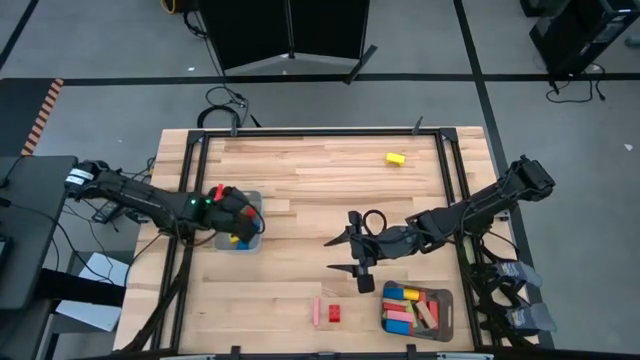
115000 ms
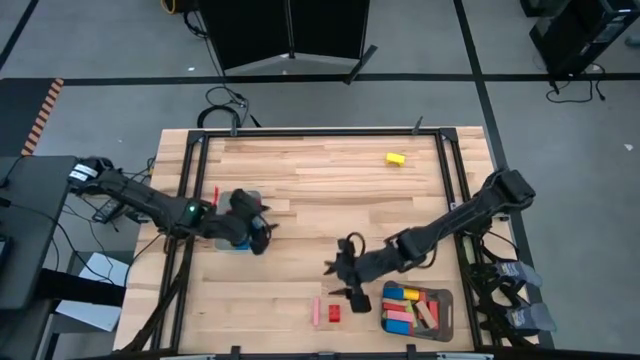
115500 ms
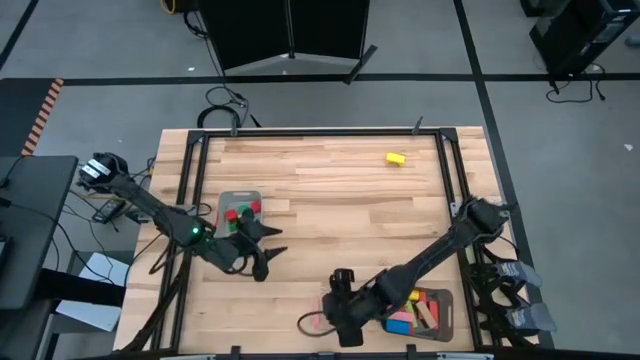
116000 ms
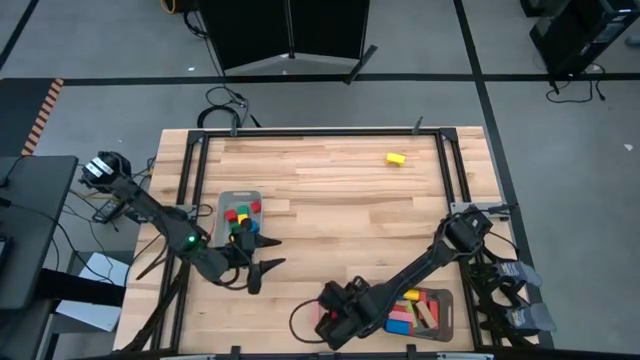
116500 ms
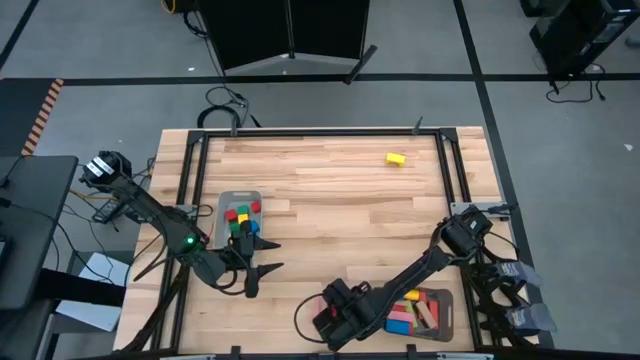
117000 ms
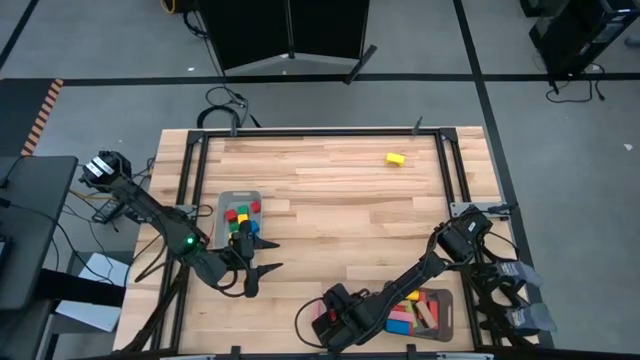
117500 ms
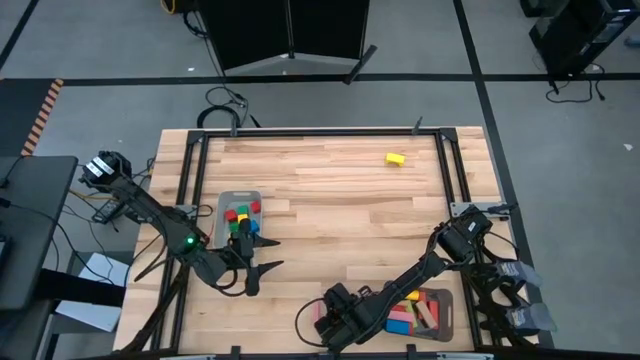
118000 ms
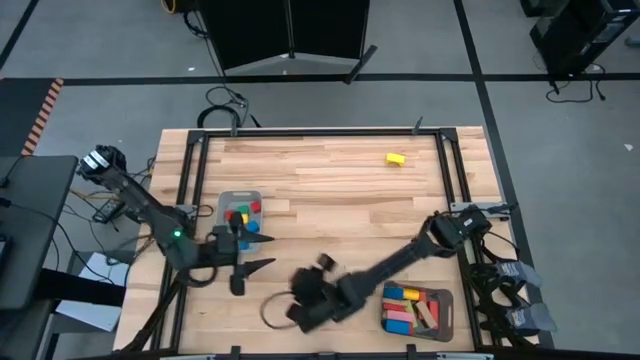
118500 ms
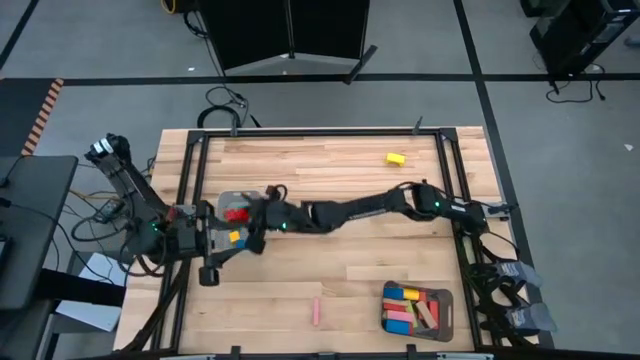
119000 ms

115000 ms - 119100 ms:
Task: Sort blocks by size
Put the red block into the grey bin

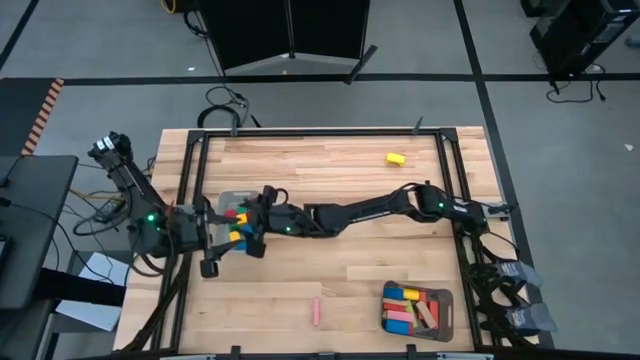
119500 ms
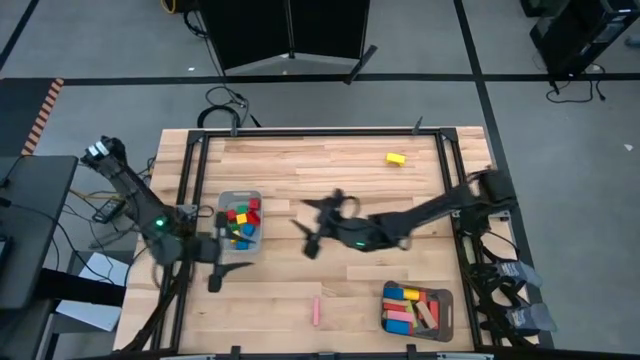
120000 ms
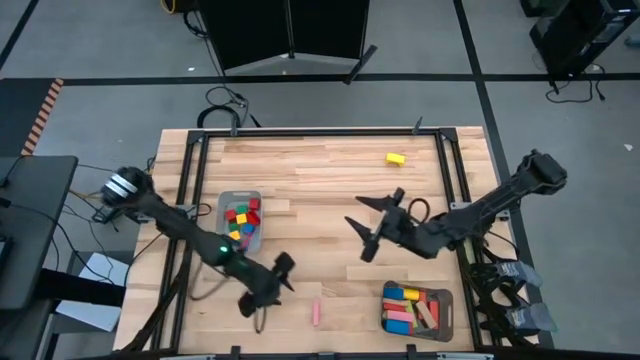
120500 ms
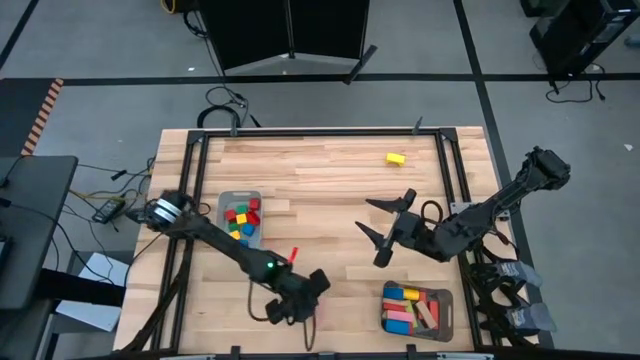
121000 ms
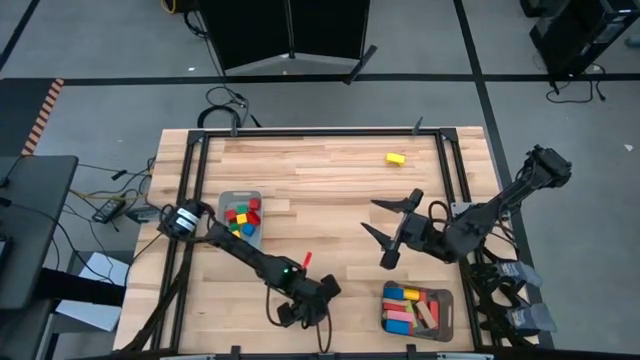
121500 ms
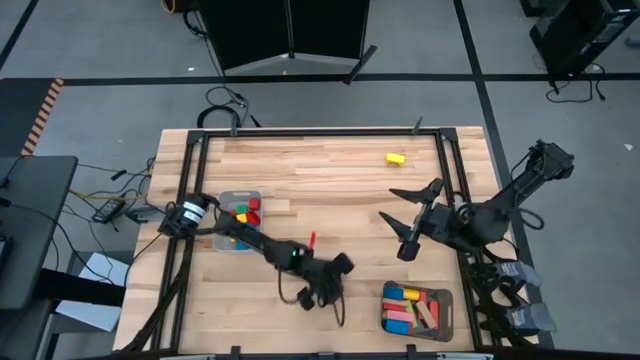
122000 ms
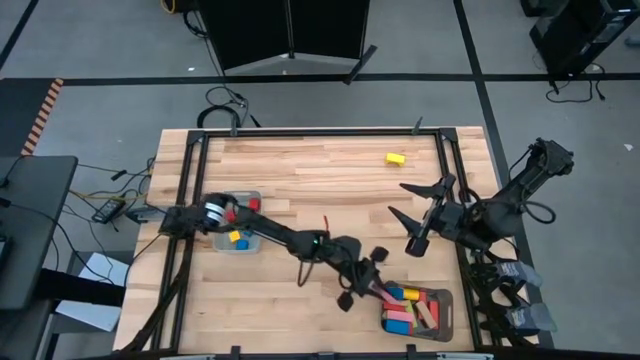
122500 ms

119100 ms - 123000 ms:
Put the pink block into the black bin

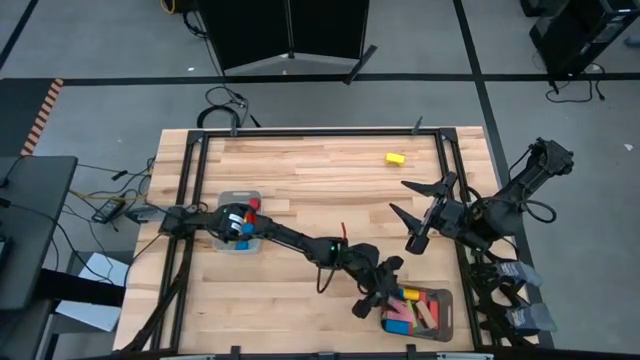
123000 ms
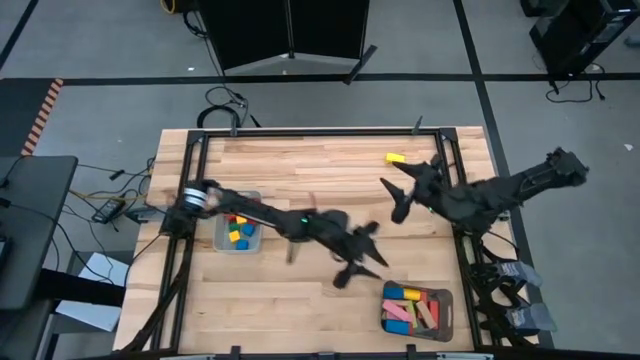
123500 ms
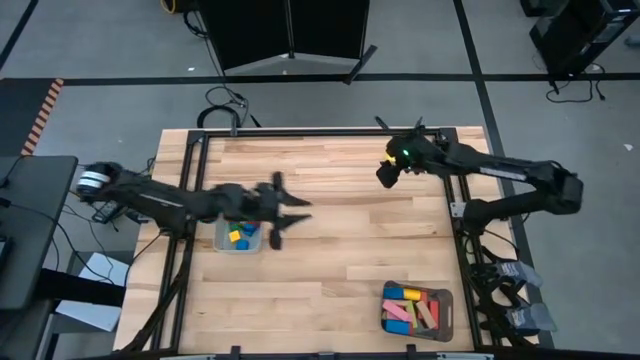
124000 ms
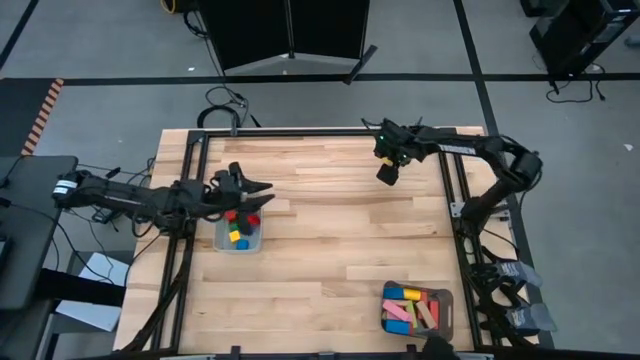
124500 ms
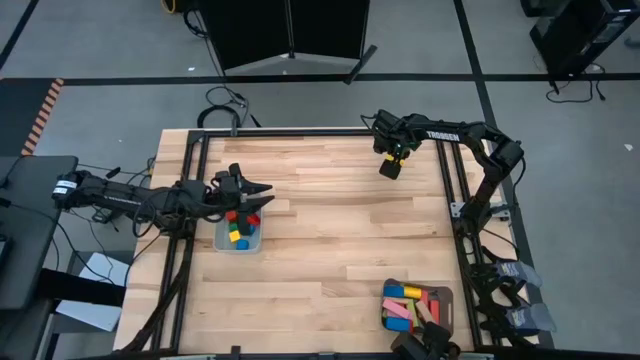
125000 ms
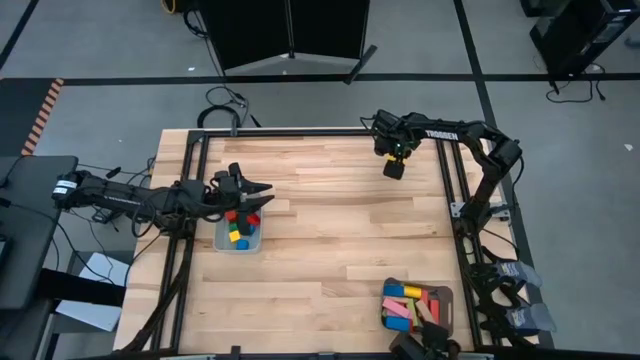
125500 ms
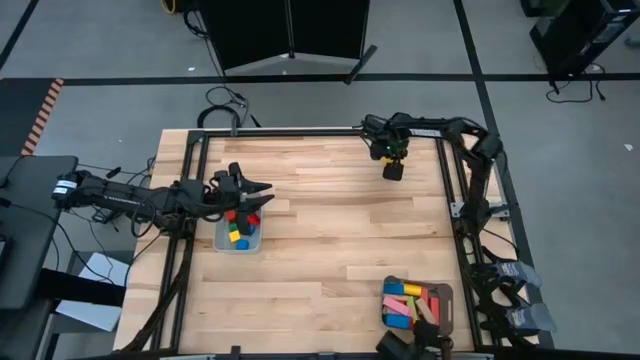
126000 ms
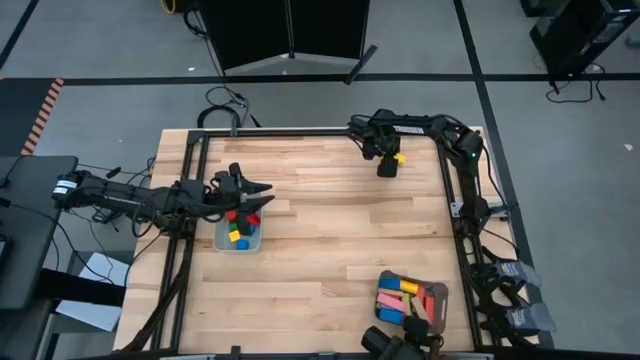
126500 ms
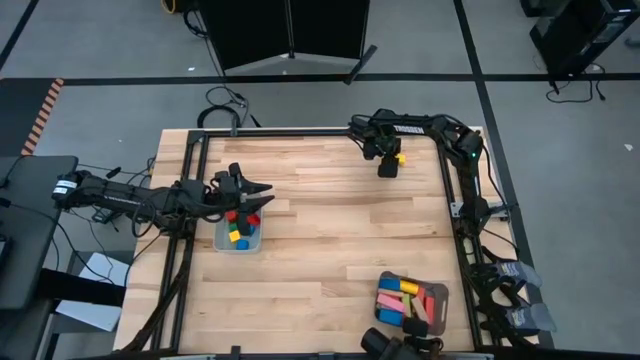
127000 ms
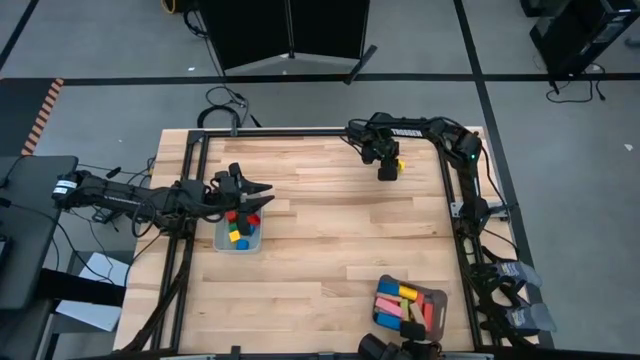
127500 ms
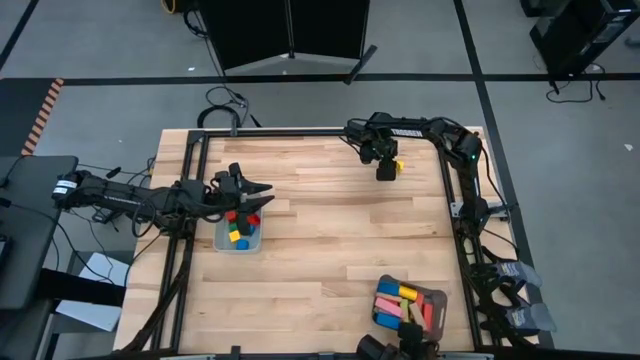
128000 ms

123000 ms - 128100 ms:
Put the yellow block into the black bin

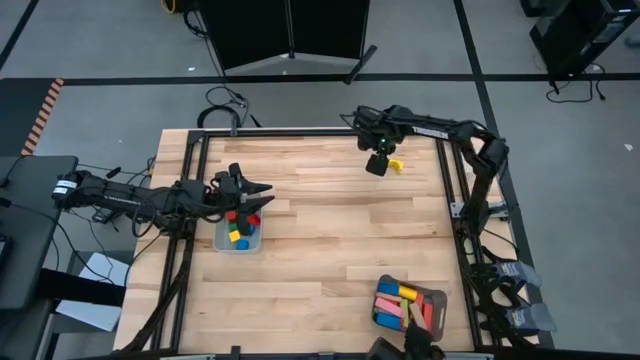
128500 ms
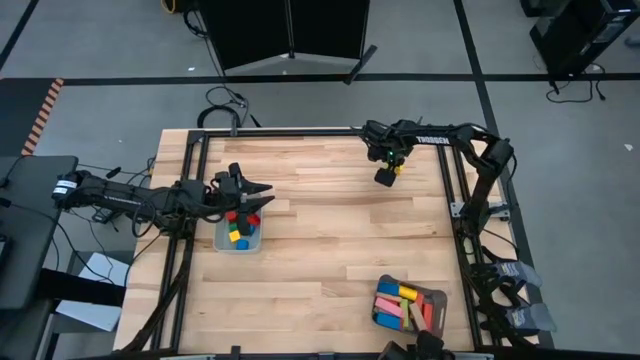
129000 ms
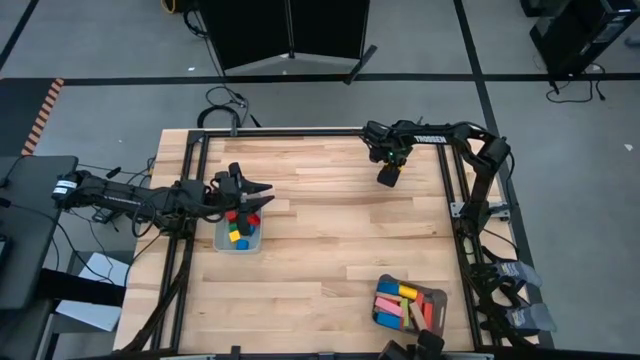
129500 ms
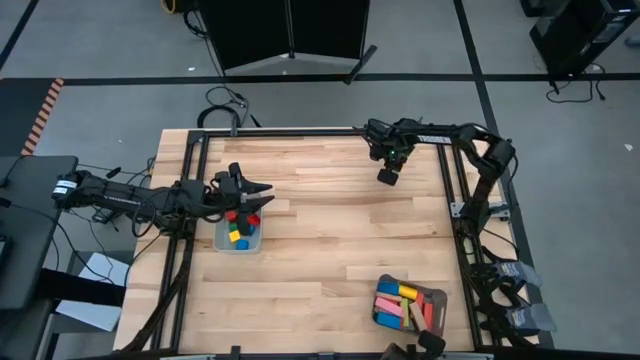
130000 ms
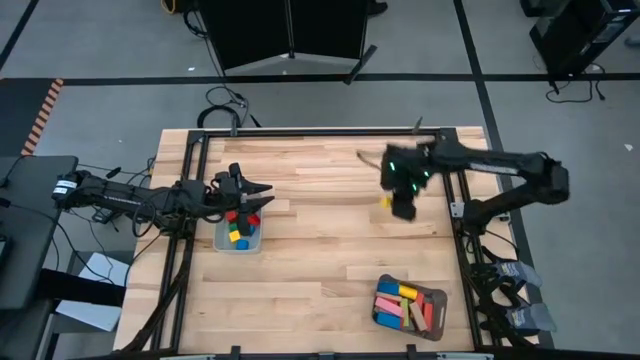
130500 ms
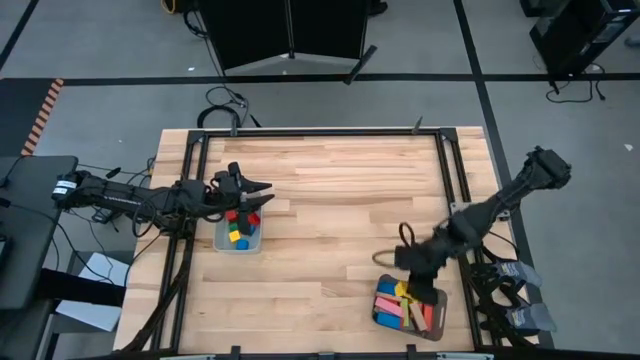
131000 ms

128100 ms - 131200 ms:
Put the yellow block into the black bin

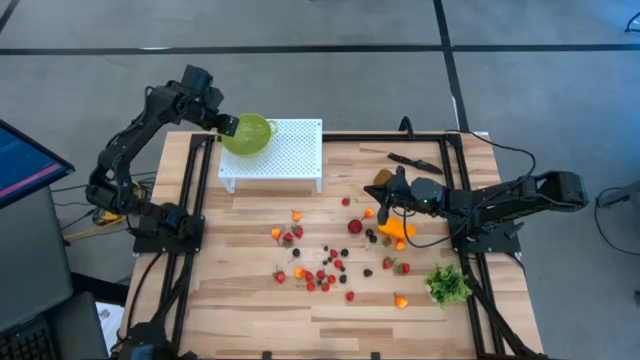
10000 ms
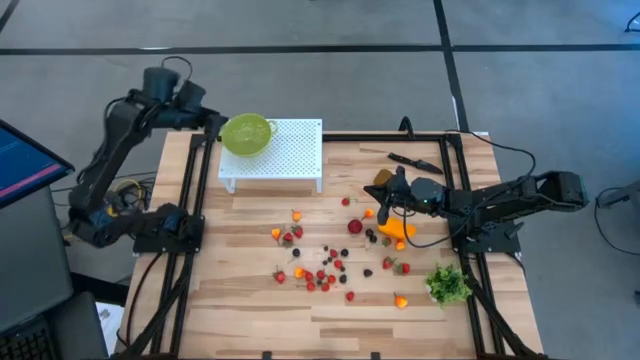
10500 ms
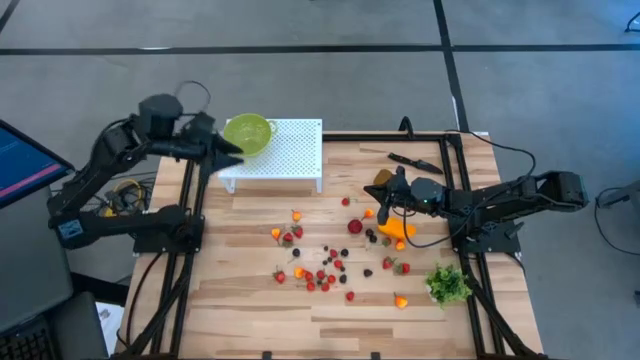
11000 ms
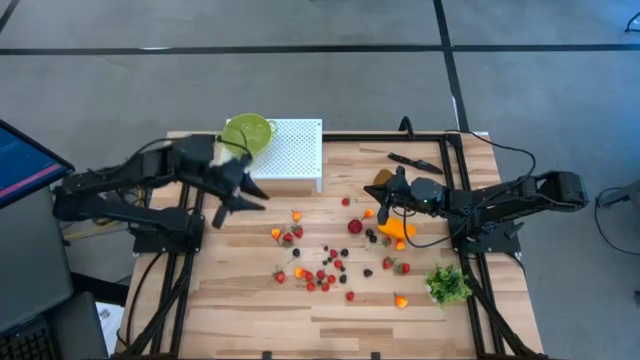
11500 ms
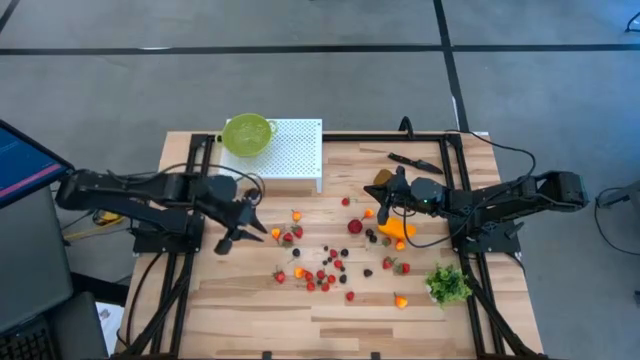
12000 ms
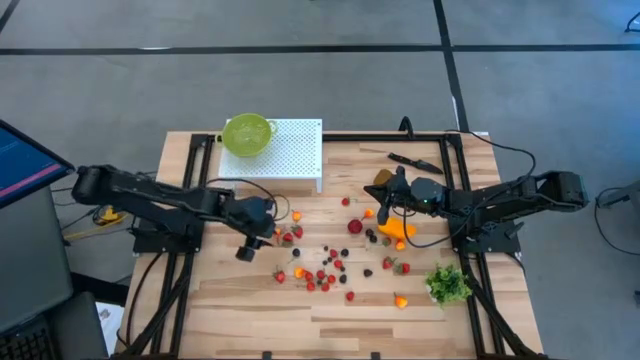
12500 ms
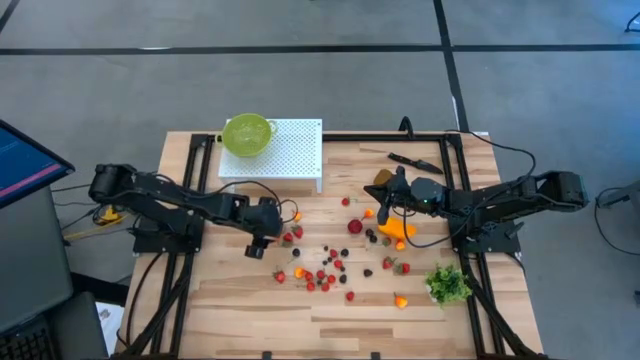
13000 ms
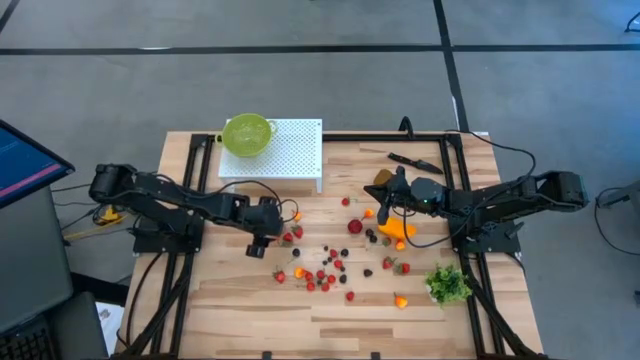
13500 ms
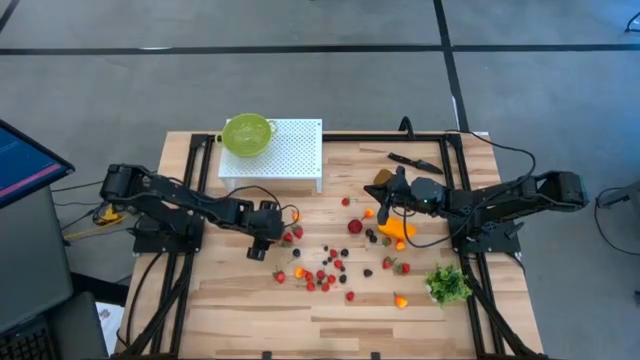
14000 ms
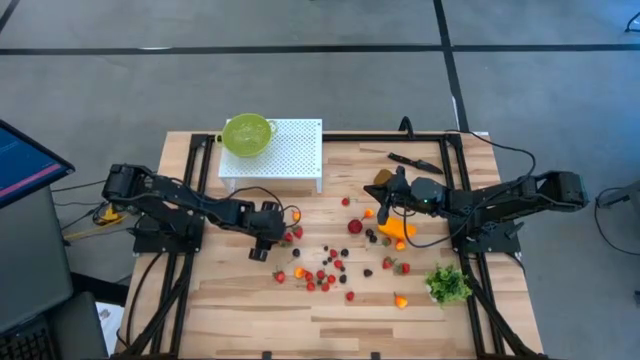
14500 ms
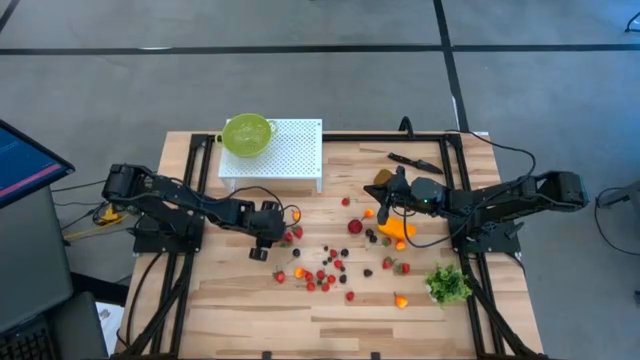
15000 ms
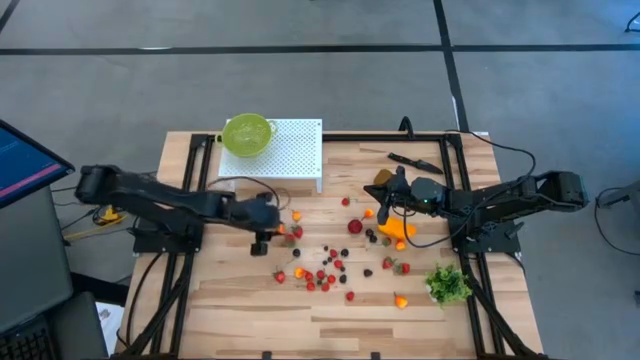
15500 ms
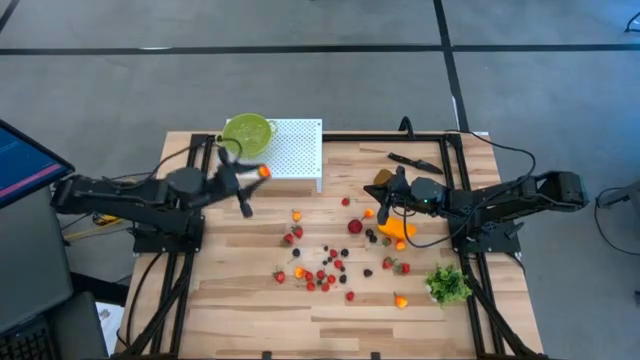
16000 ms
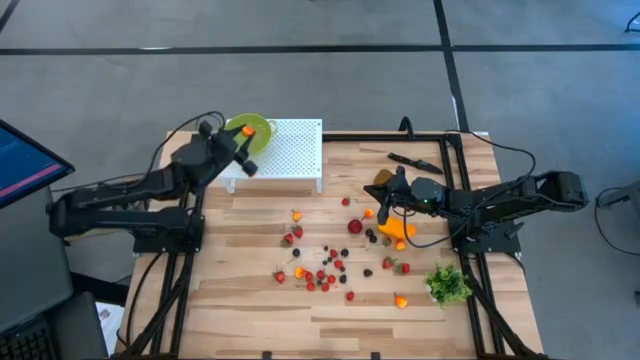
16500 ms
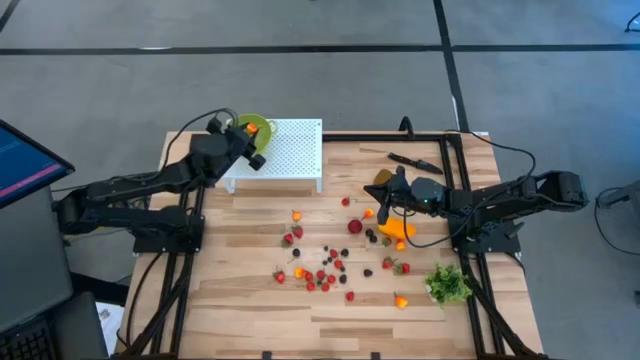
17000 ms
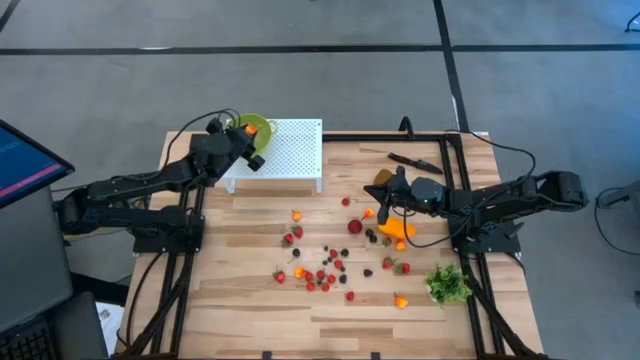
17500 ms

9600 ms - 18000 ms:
Task: Pick & Place Fruit
Put the peach into the green strainer bowl on the shelf
